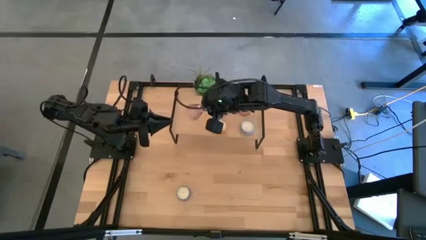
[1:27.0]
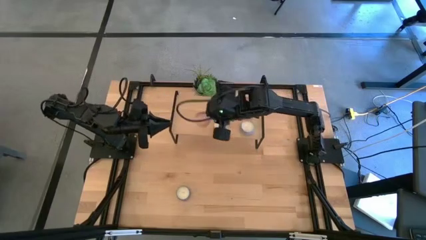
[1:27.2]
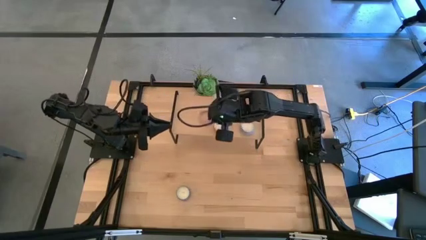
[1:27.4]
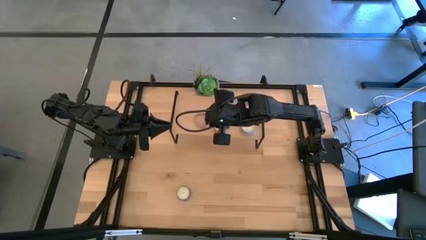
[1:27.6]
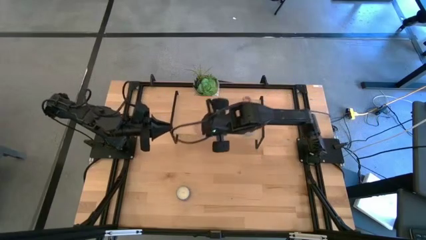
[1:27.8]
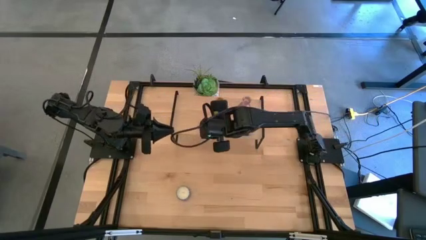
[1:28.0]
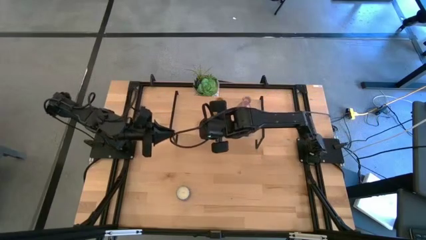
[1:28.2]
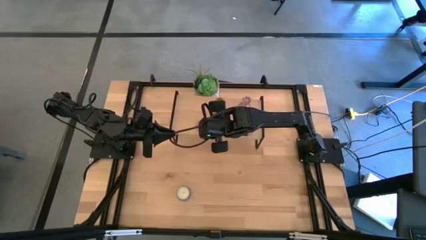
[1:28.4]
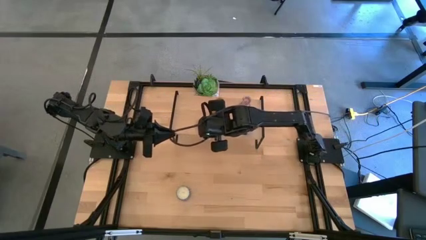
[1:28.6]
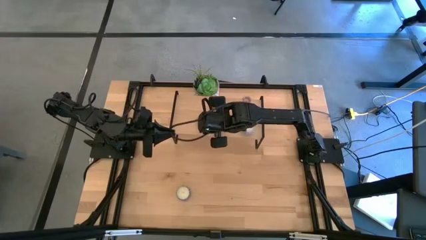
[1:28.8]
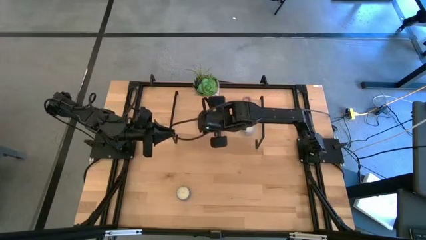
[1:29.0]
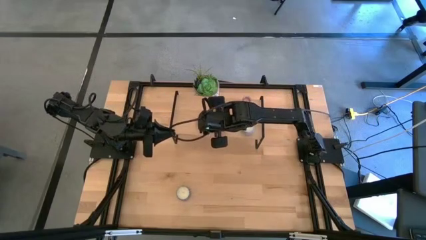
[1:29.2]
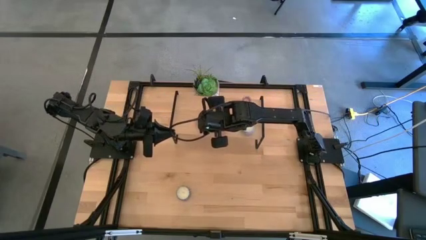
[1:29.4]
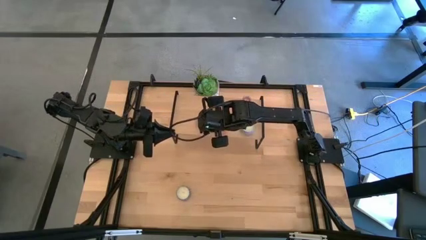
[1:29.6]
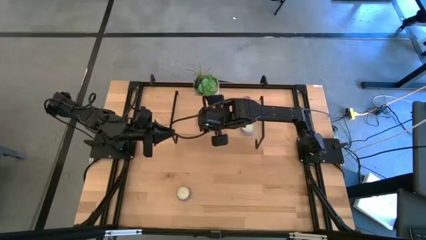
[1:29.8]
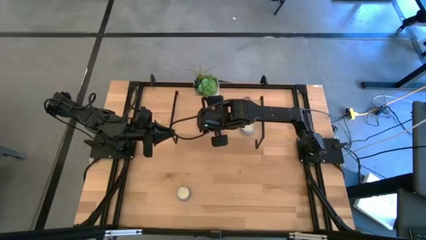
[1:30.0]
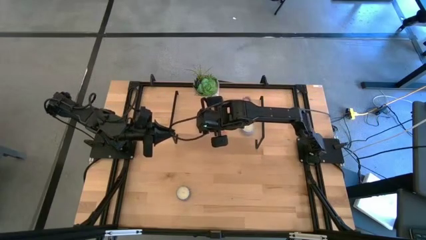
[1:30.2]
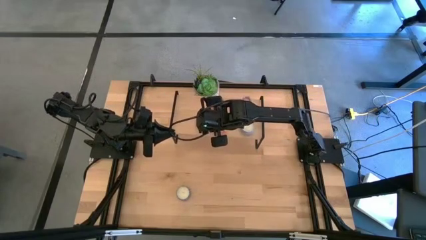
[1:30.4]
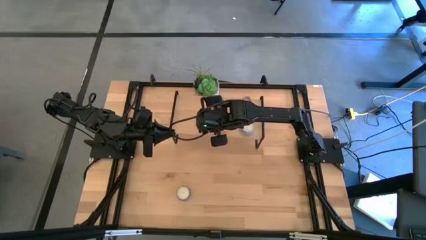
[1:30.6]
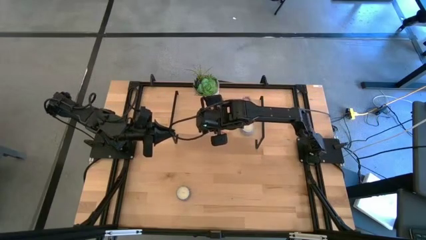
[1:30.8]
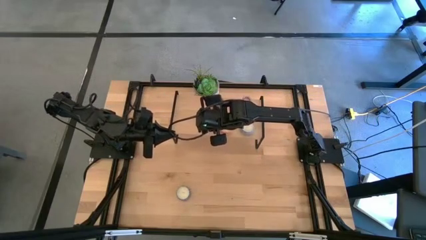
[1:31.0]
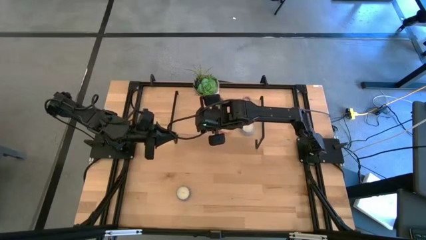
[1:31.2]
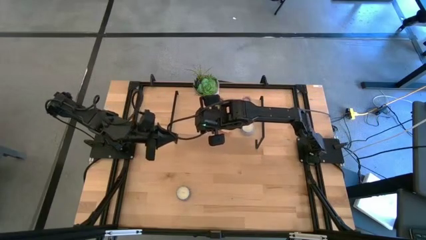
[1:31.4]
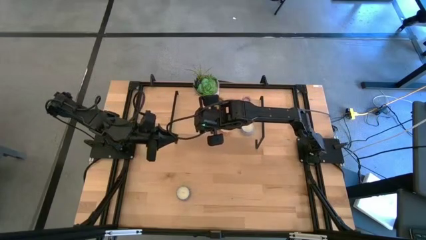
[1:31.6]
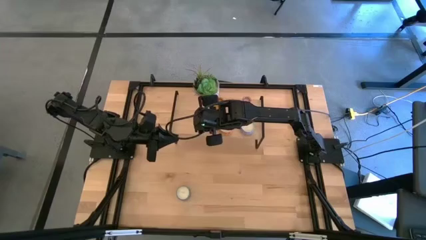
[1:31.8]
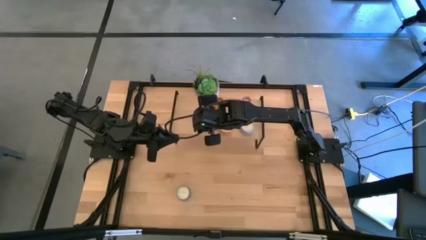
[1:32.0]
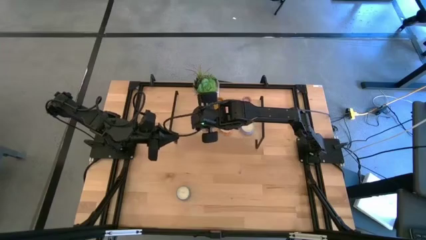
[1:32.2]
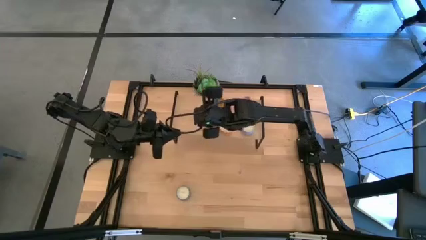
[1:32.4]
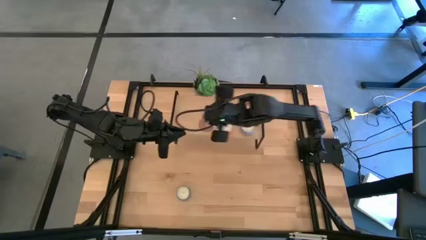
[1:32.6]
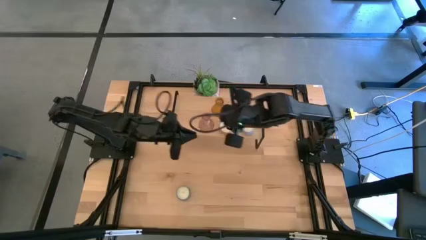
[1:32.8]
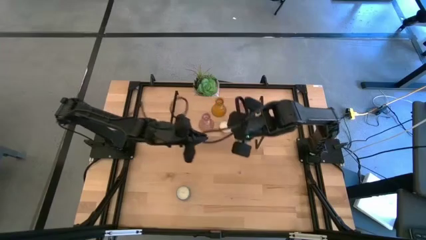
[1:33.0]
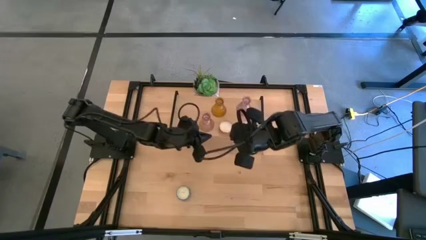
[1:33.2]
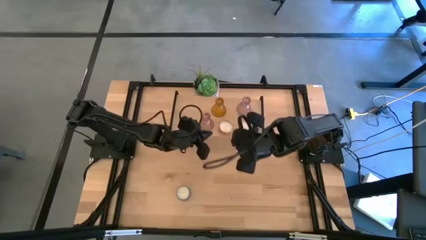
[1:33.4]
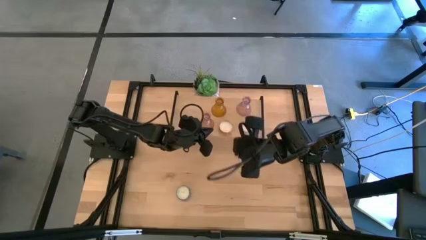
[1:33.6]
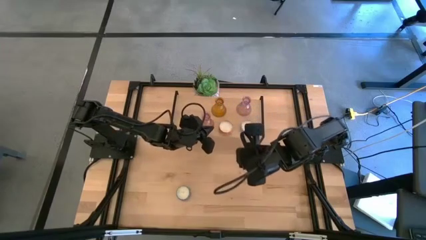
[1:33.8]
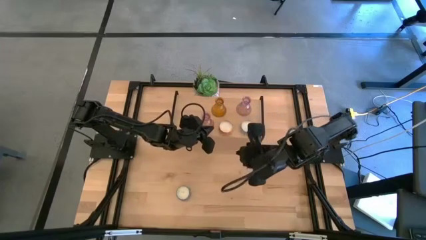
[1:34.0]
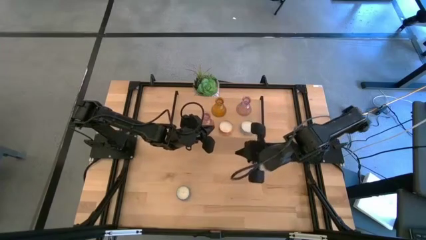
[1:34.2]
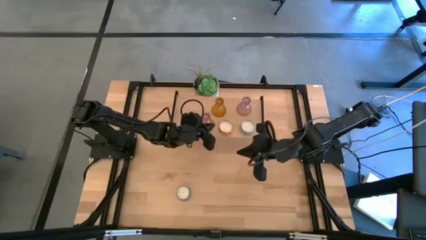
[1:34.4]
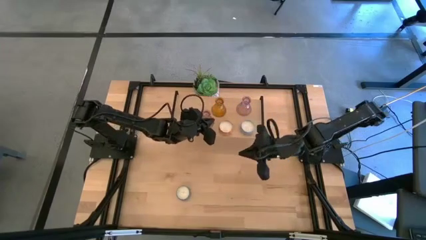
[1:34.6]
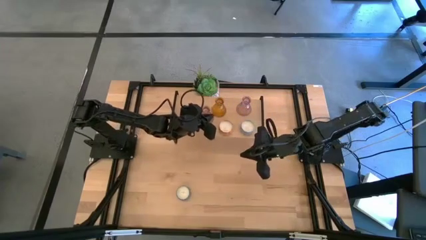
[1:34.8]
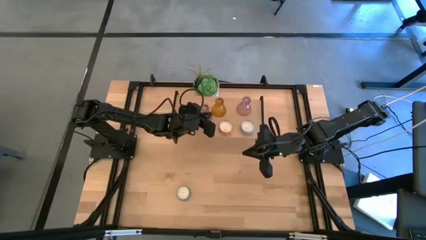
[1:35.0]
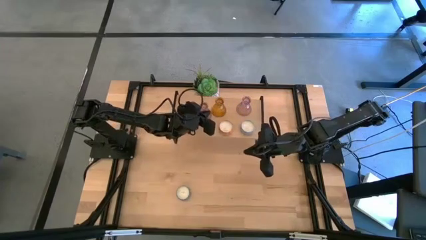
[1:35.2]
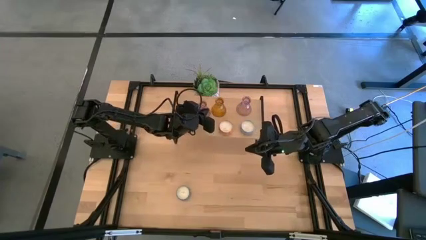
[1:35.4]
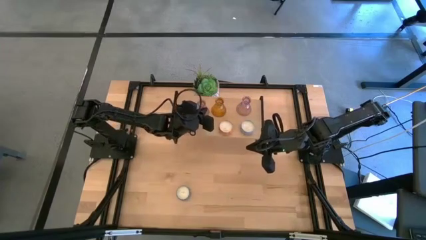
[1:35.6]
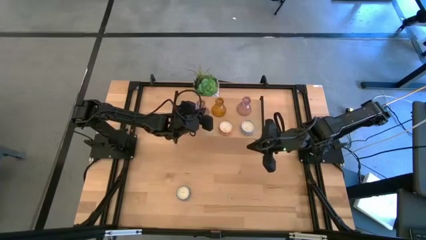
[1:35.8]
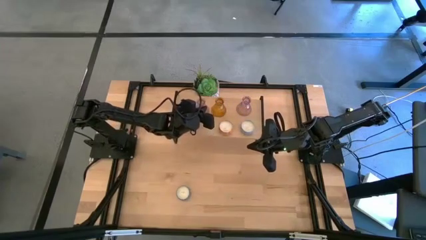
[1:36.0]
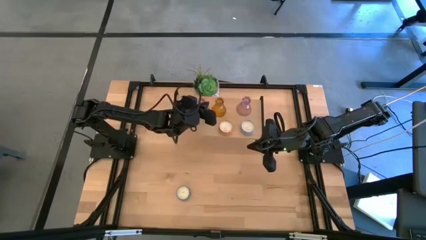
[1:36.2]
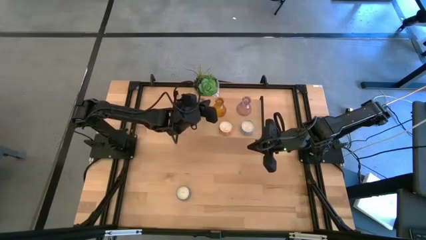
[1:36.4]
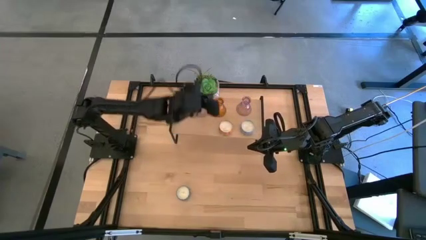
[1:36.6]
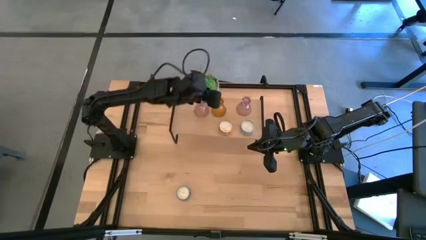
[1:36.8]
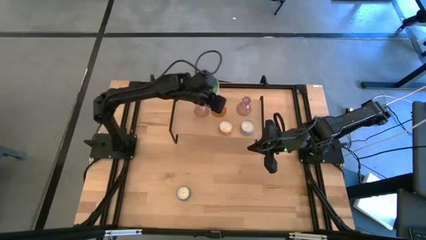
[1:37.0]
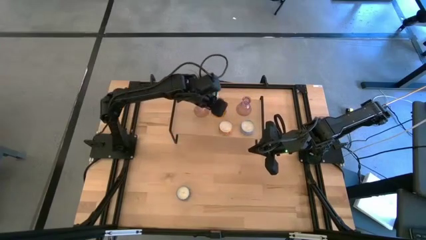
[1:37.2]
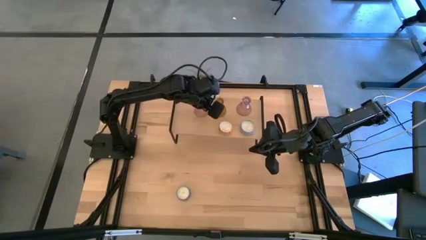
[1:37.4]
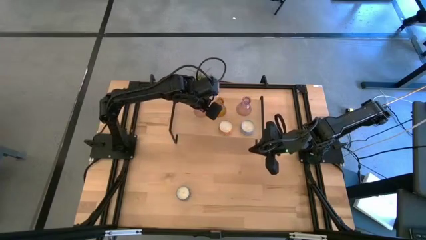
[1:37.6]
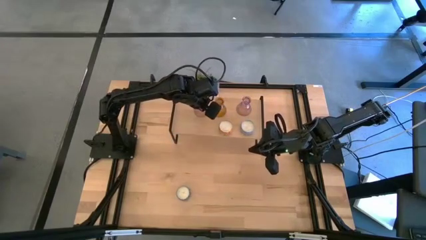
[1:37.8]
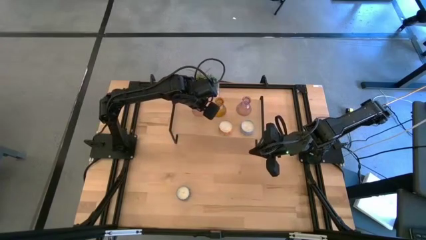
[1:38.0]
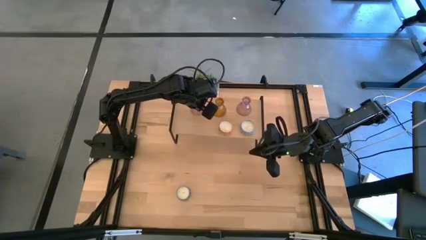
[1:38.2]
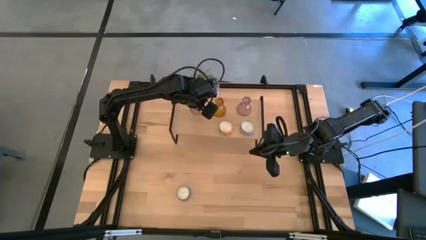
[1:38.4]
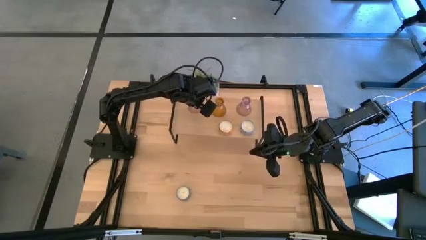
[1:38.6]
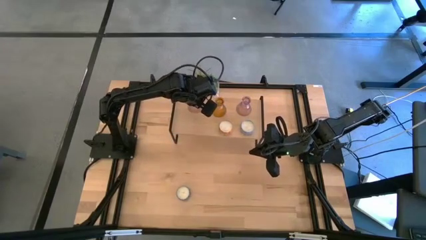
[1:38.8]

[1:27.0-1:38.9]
Task: Pick & Place candle stick holders
Put the violet candle holder on the shelf

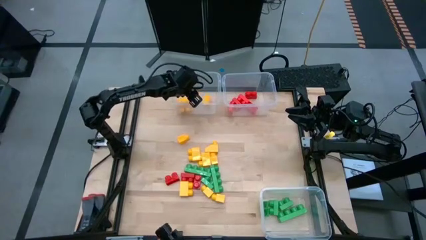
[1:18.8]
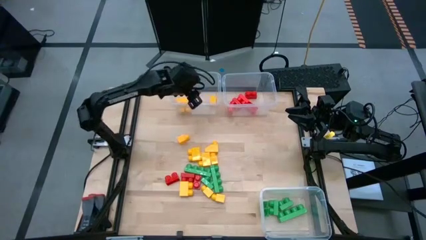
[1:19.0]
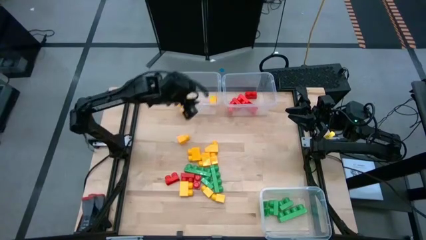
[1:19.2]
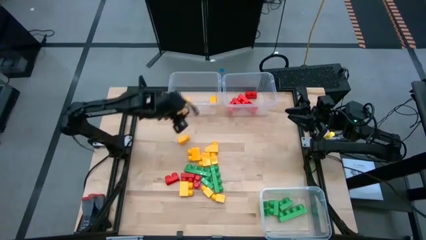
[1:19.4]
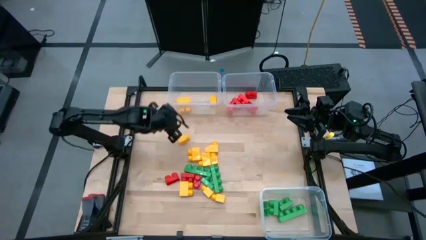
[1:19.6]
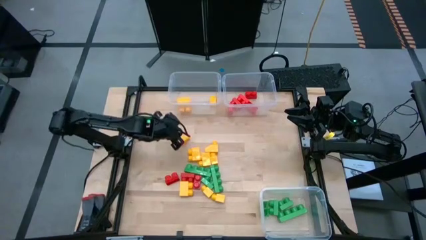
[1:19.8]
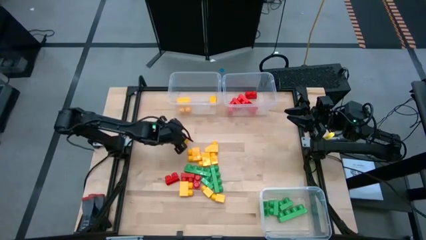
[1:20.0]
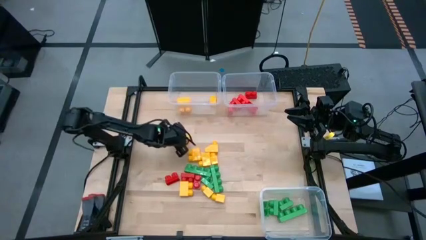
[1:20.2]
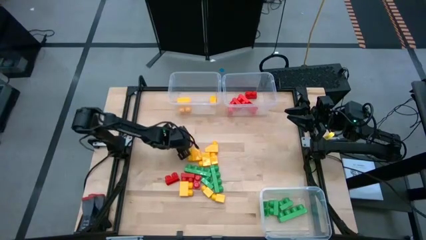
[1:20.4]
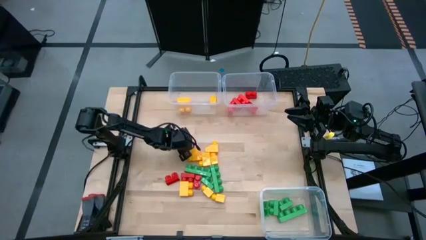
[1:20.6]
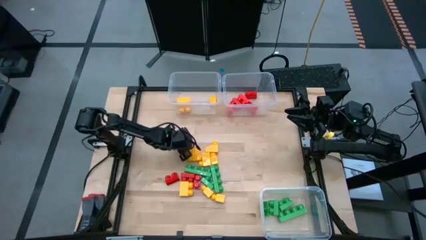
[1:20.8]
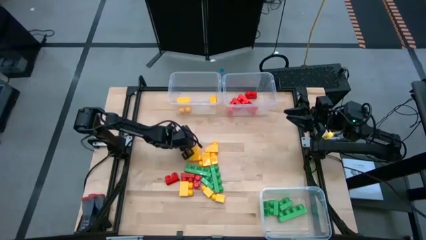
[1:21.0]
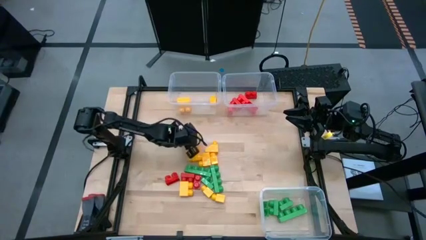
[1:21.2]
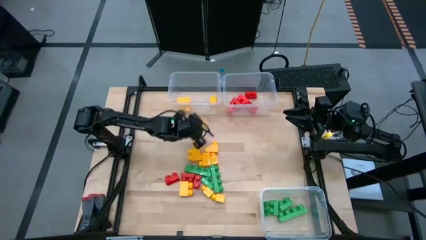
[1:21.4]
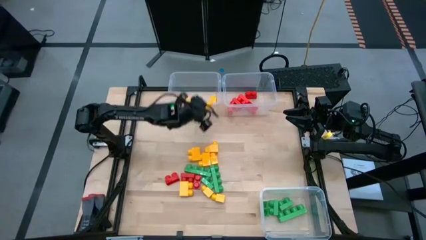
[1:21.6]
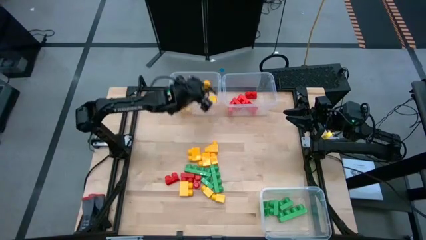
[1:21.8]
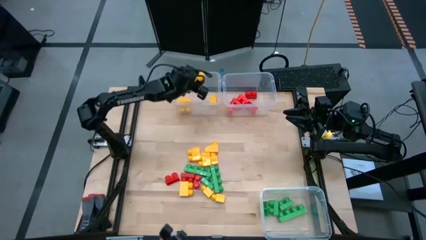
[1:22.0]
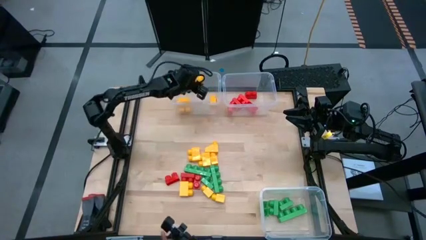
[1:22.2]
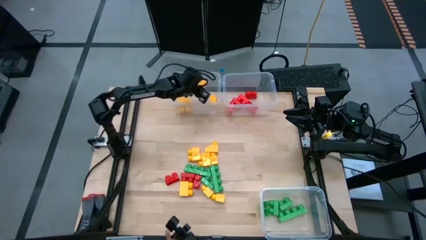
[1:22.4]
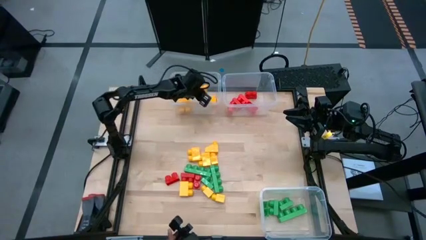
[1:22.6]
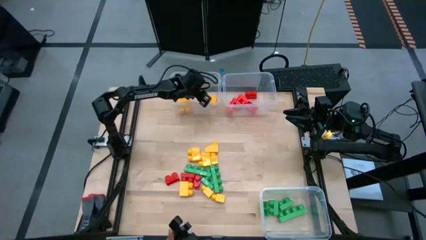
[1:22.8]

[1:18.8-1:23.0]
Task: Sort blocks
Put the yellow game piece into the top left transparent bin

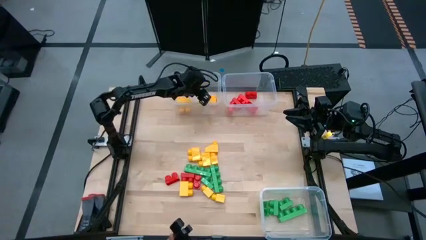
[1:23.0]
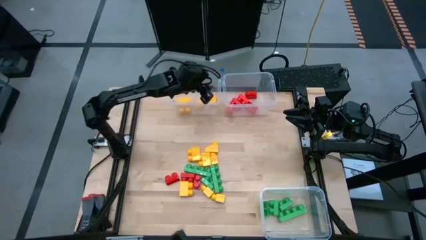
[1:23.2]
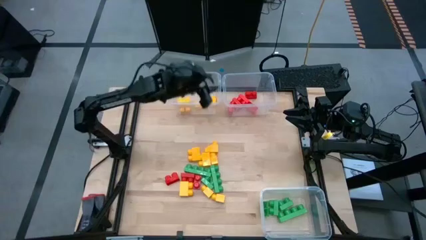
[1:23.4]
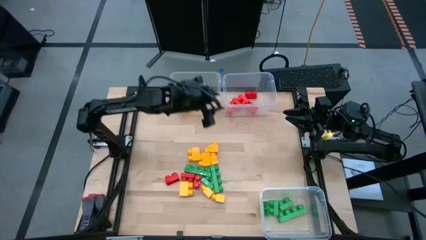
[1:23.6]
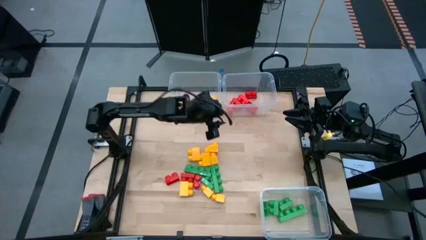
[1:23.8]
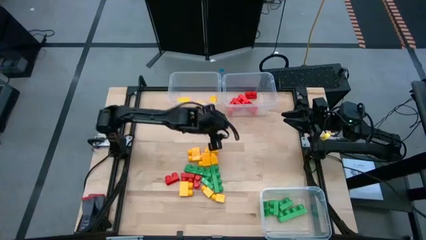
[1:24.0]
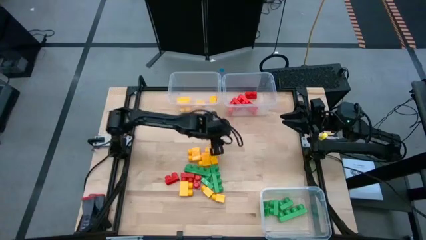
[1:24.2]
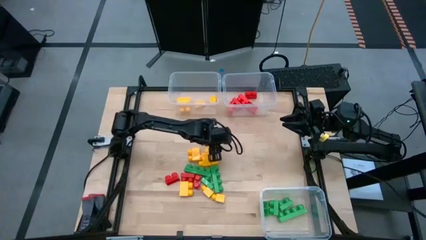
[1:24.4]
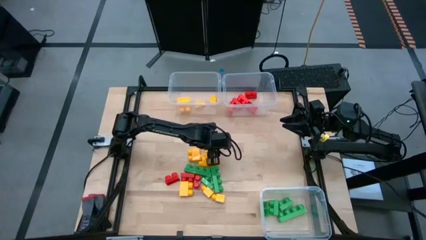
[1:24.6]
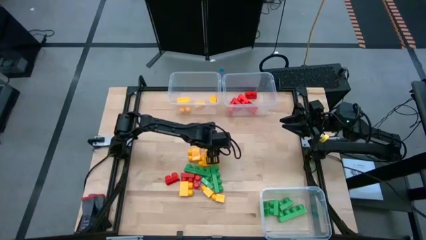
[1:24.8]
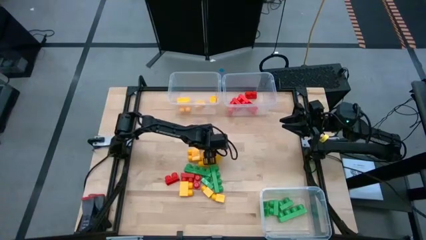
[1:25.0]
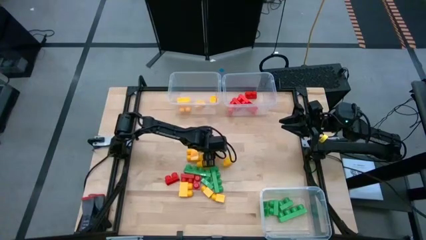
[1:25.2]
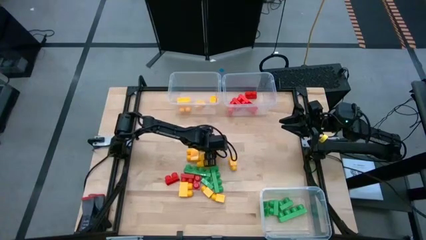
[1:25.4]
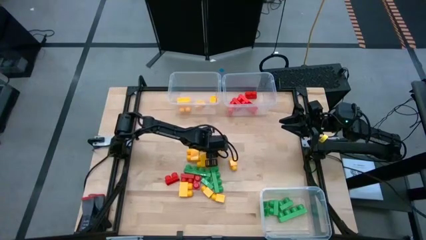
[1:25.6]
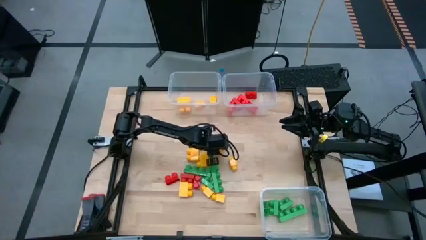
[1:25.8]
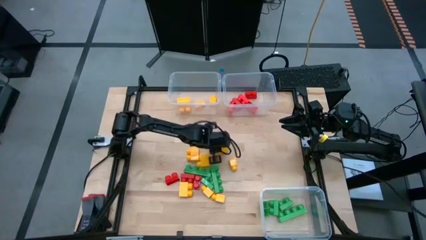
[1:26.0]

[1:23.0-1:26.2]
Put the yellow game piece into the top left transparent bin
